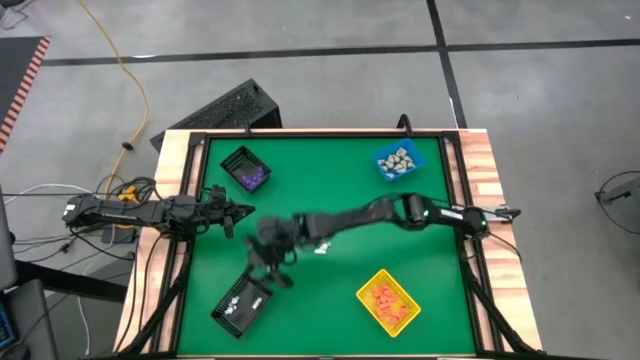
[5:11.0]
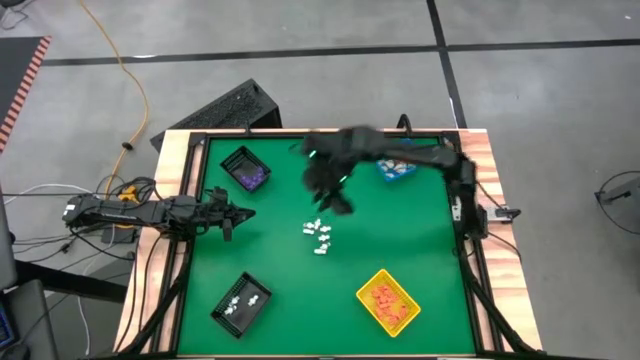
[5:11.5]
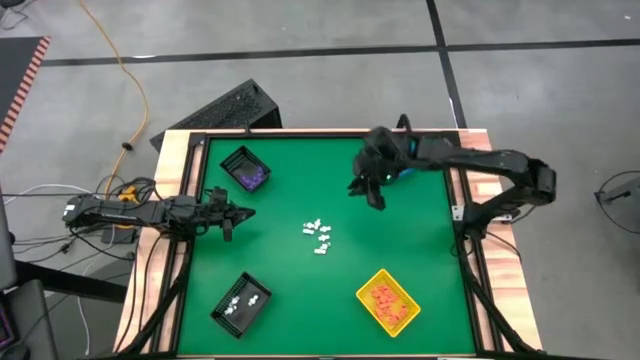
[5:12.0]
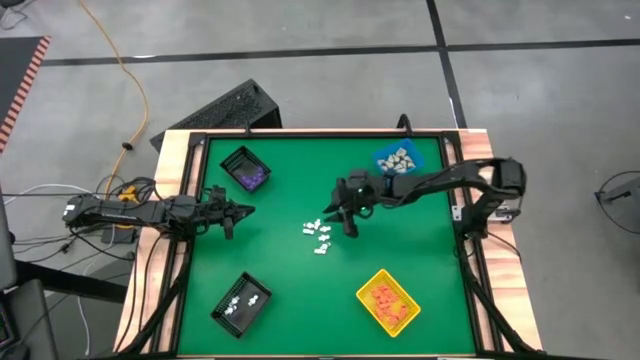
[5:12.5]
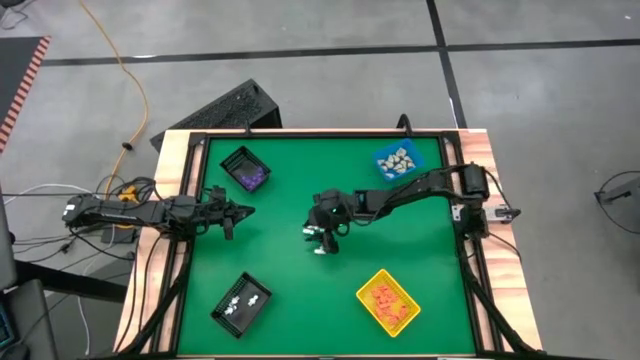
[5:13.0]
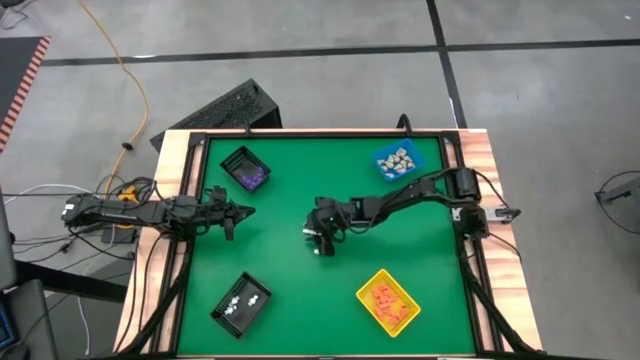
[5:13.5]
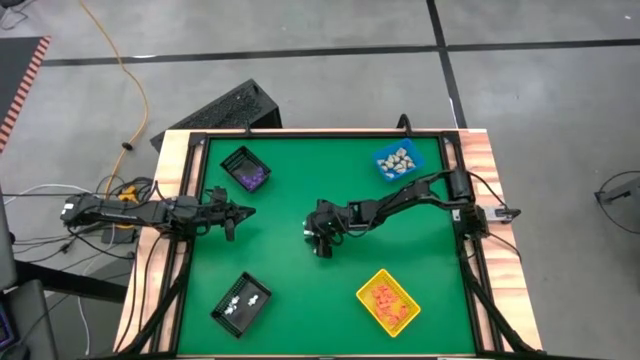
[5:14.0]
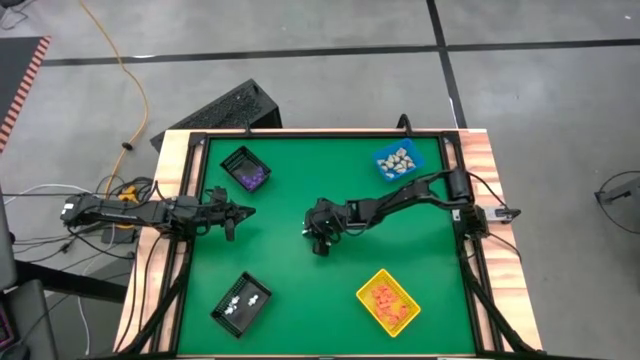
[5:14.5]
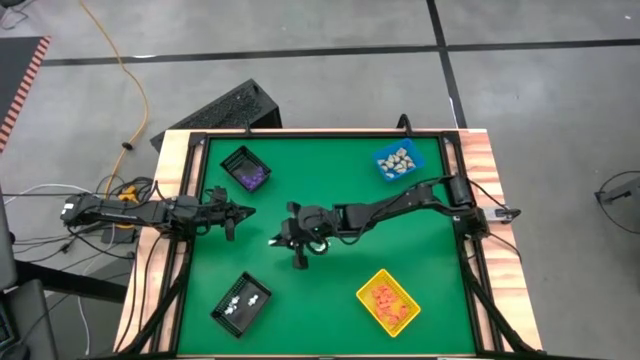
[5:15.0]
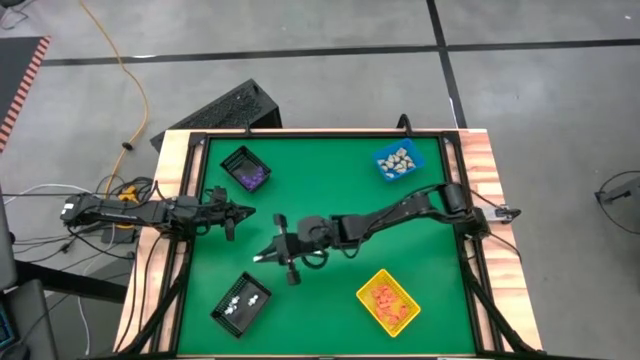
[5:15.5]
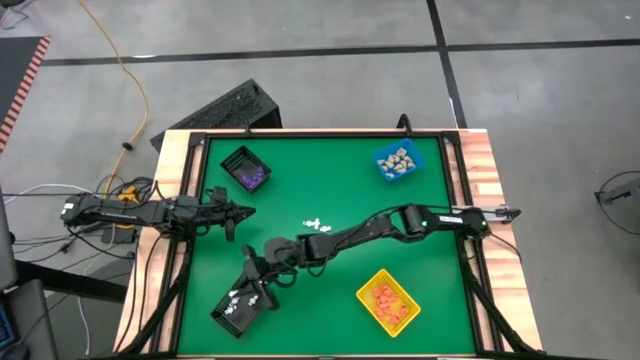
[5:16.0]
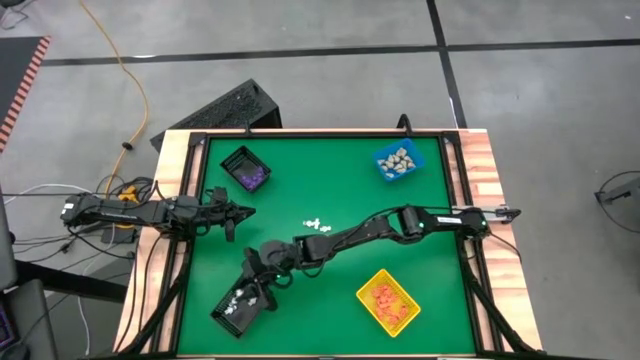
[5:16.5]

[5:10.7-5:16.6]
Task: Sort Halloween decoration
Put the white skeleton toy into the bottom black basket

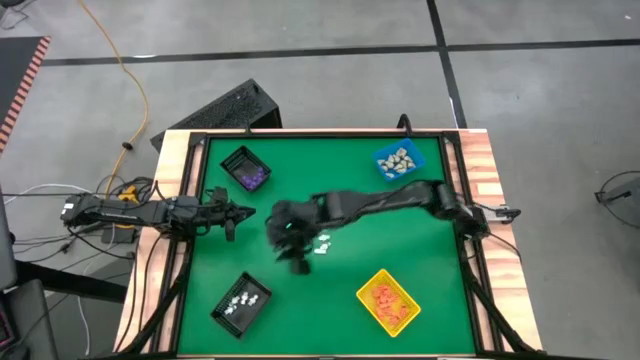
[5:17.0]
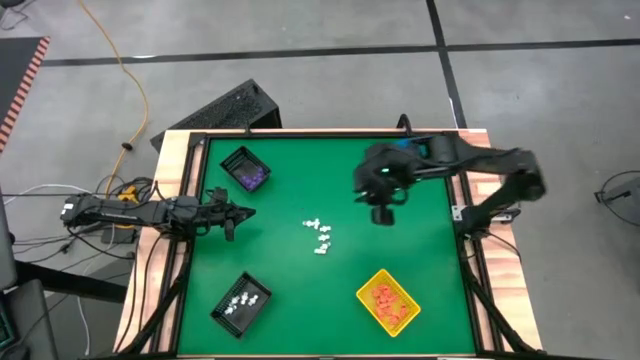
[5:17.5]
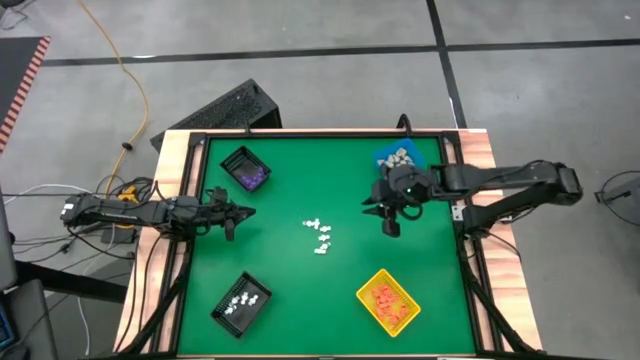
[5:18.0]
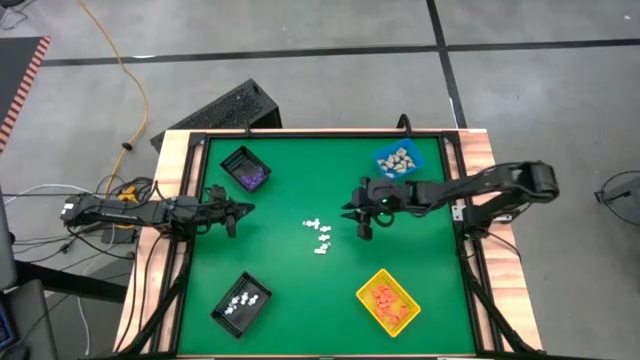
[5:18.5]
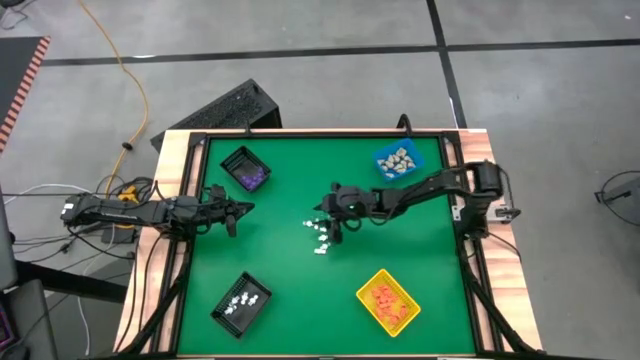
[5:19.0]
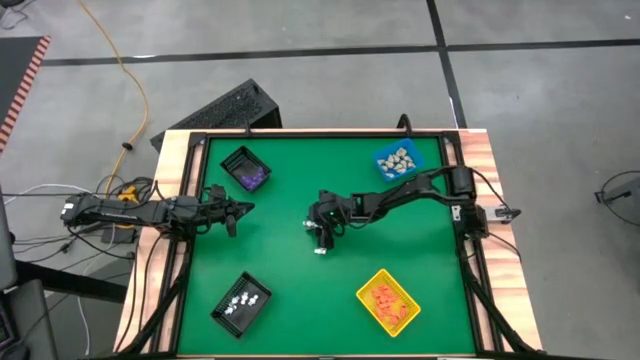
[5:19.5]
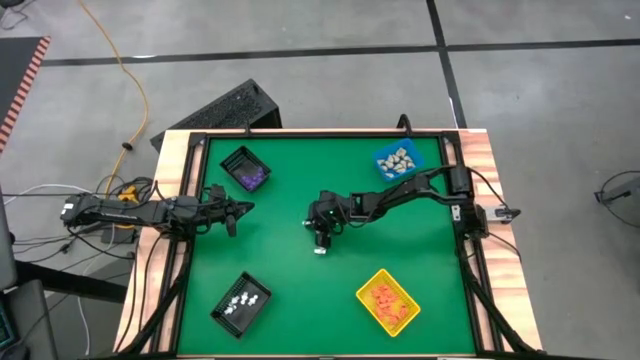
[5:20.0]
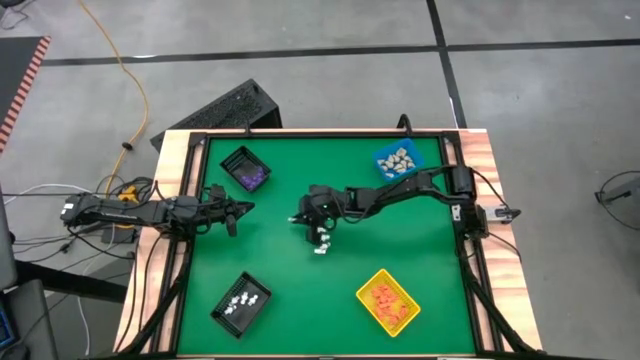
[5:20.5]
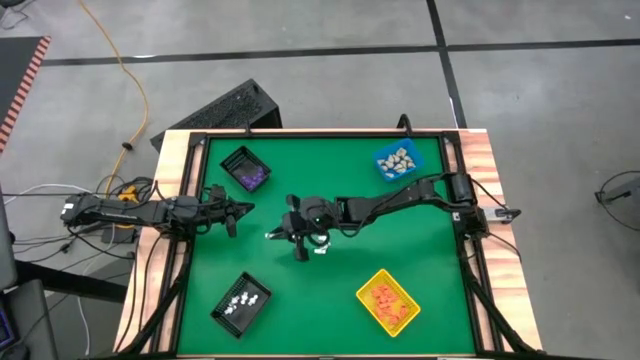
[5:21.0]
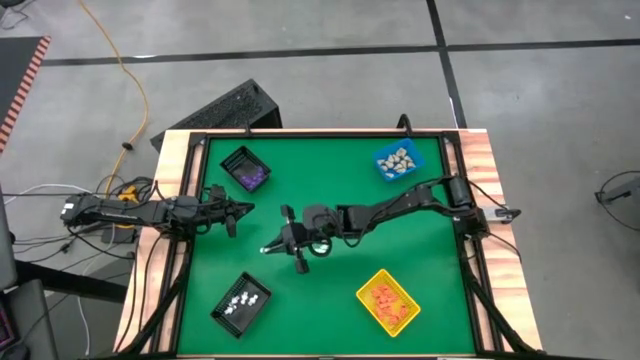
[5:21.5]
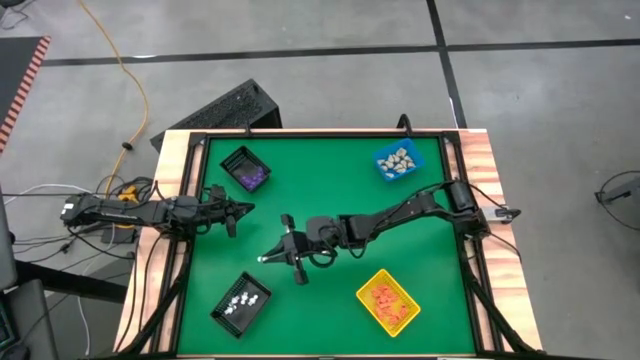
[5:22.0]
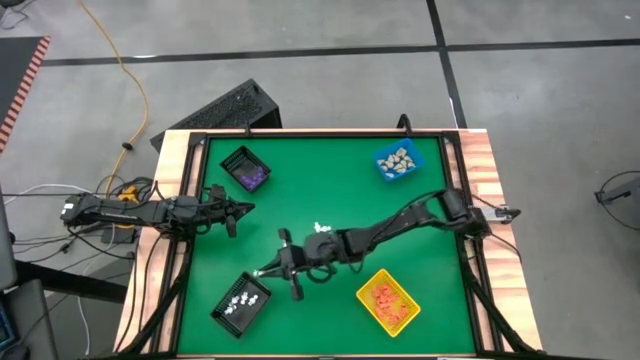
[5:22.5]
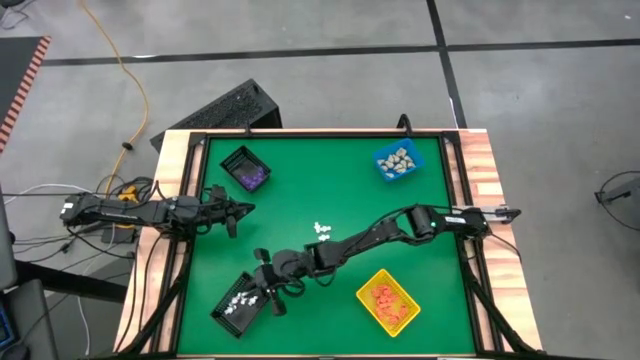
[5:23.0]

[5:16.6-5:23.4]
Put the white skeleton toy into the bottom black basket

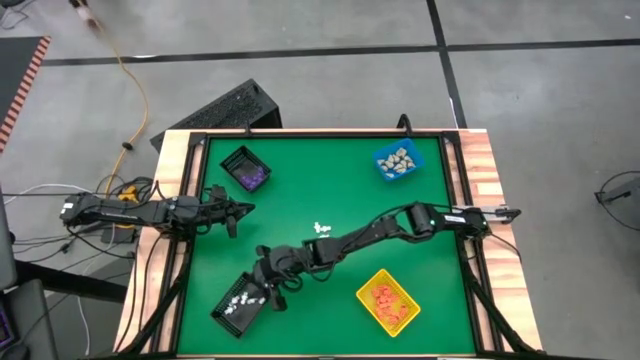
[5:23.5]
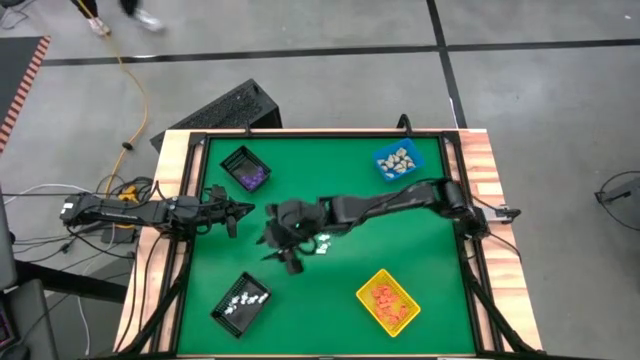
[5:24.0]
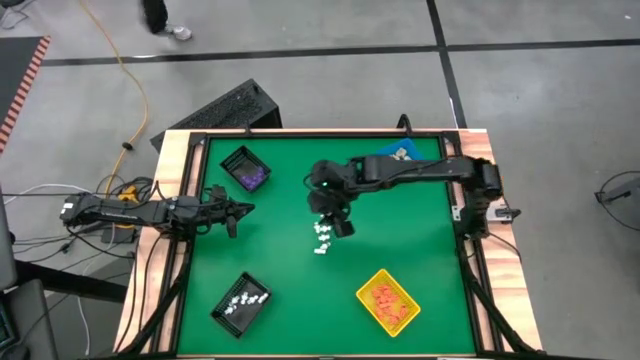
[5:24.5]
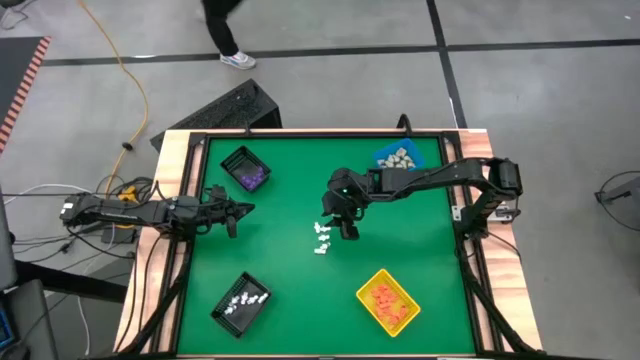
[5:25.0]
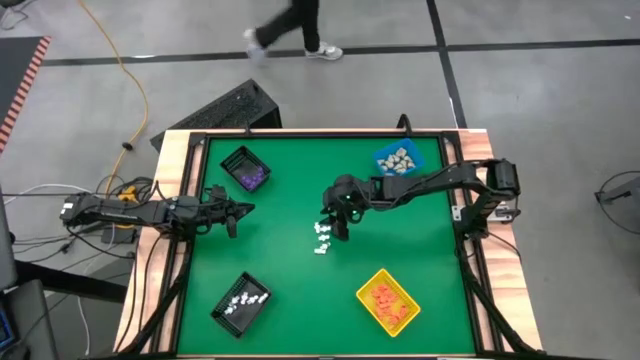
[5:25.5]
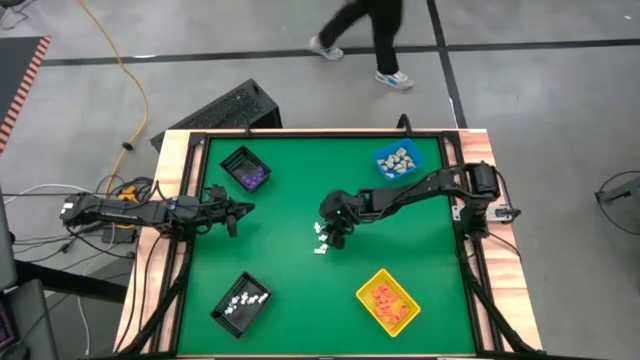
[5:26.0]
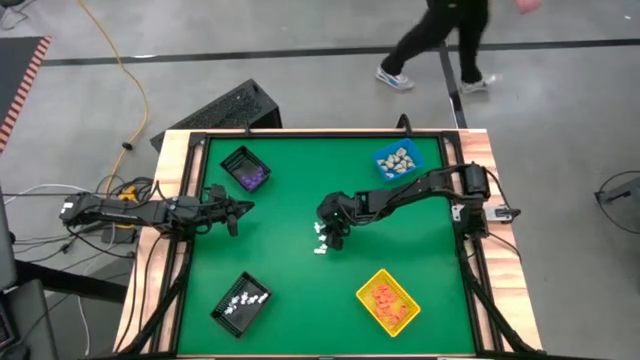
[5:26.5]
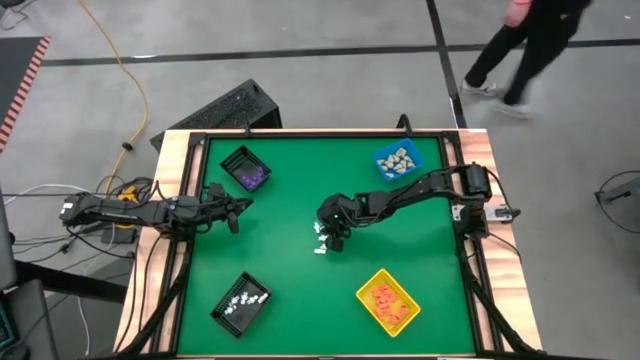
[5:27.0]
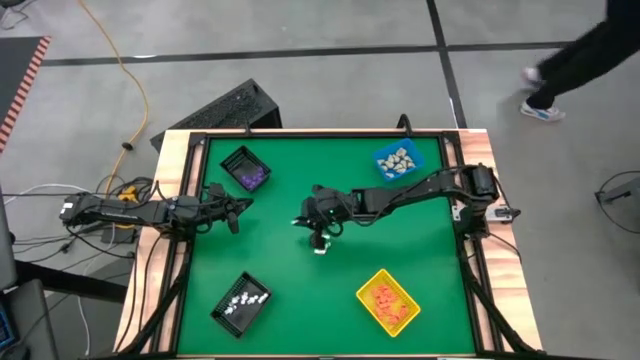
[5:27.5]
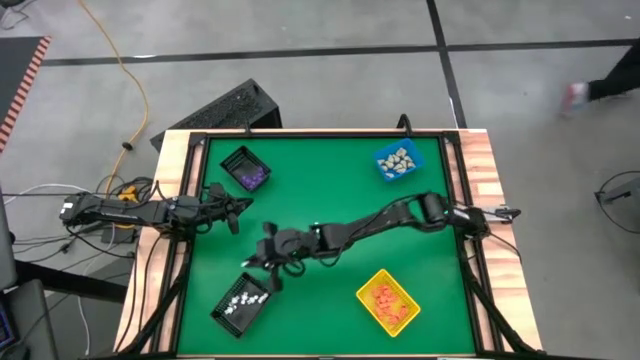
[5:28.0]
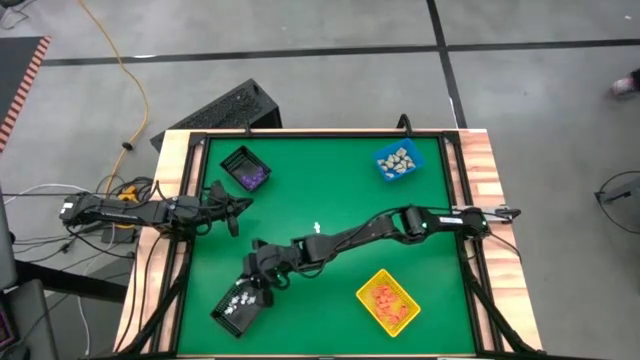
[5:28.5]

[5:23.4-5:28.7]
Put the white skeleton toy into the bottom black basket

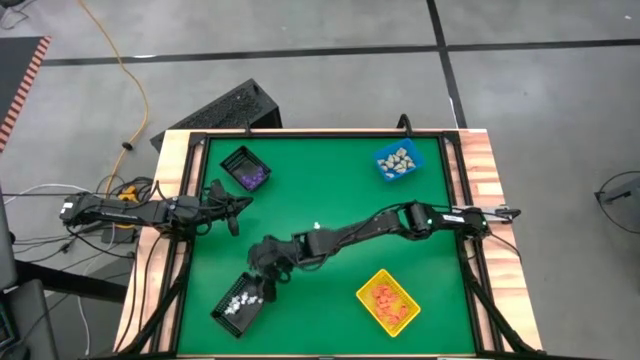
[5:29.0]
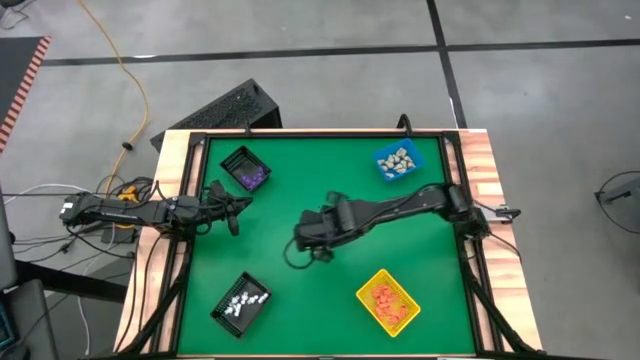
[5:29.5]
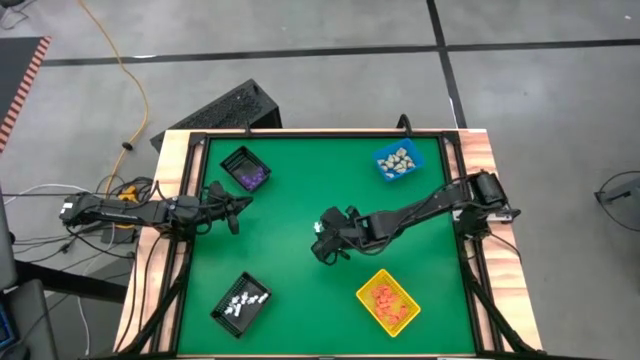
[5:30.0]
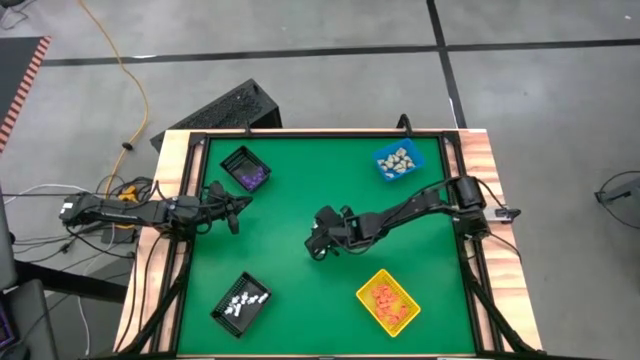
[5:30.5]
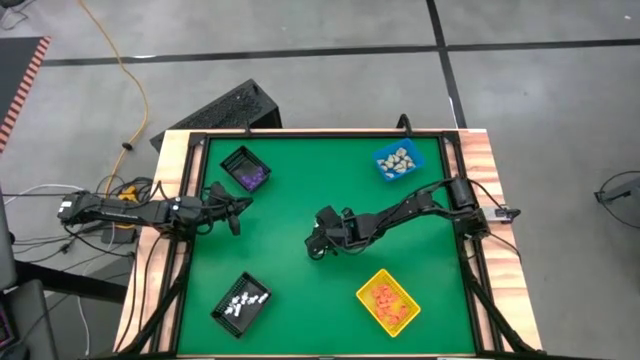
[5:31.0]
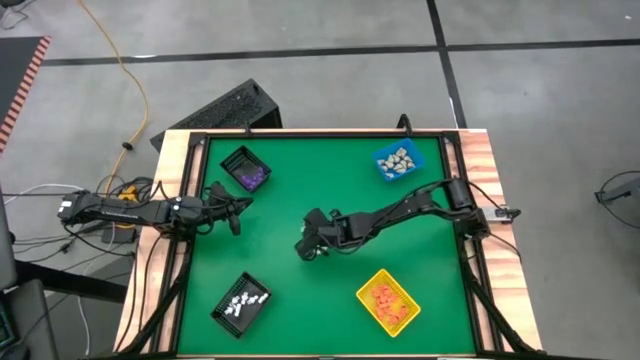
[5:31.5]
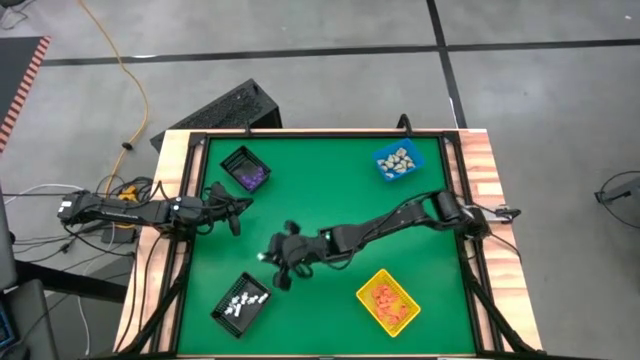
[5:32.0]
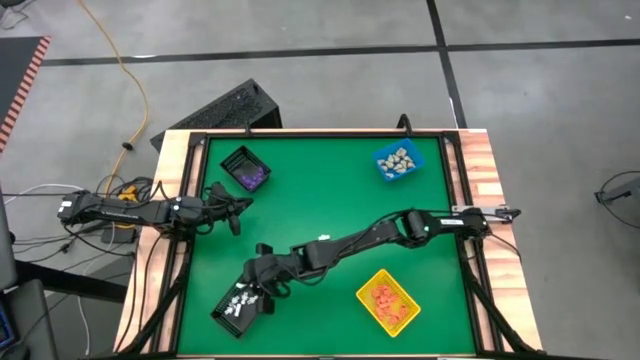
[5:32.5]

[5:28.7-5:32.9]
Put the white skeleton toy into the bottom black basket
